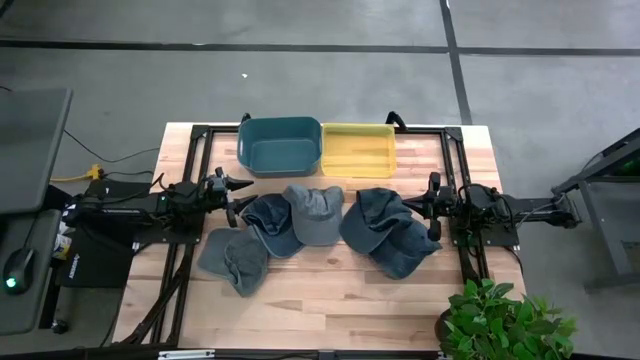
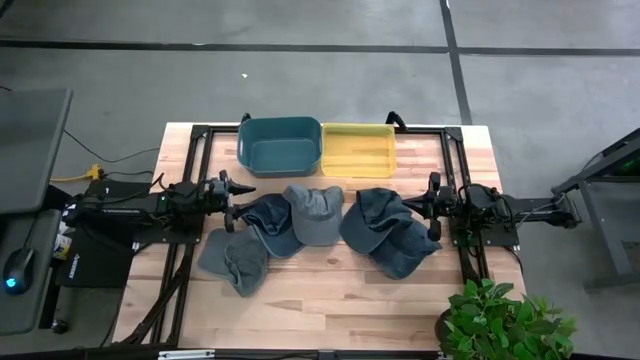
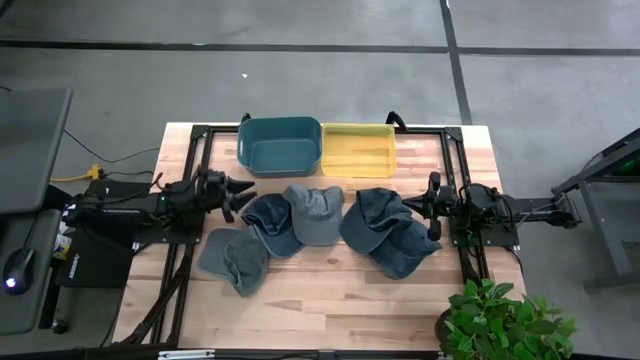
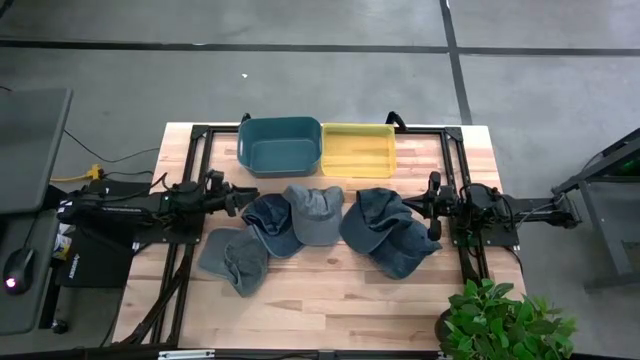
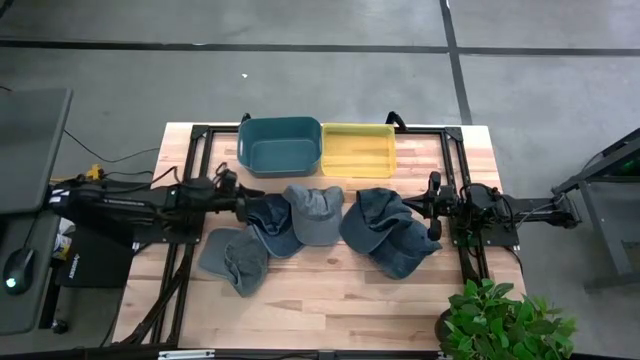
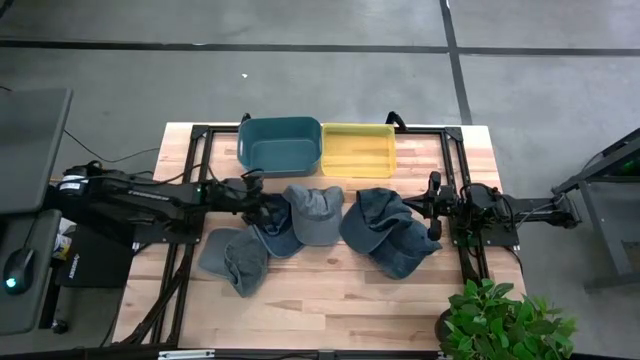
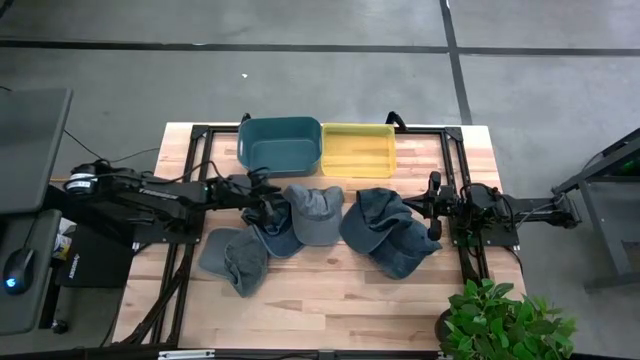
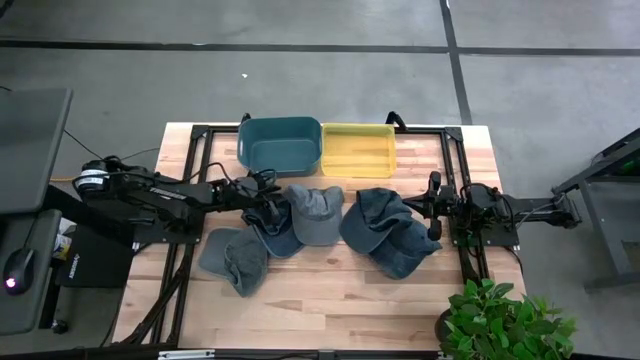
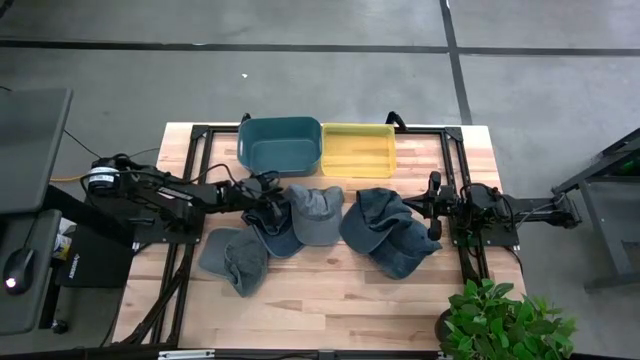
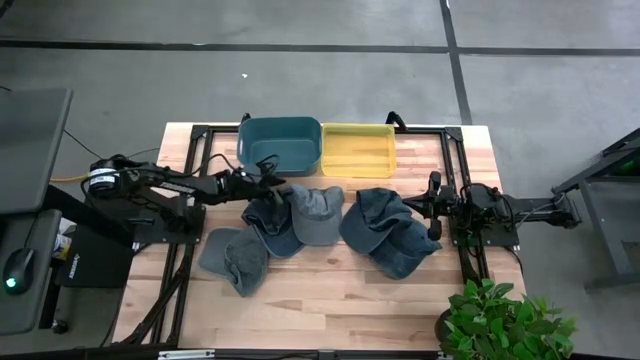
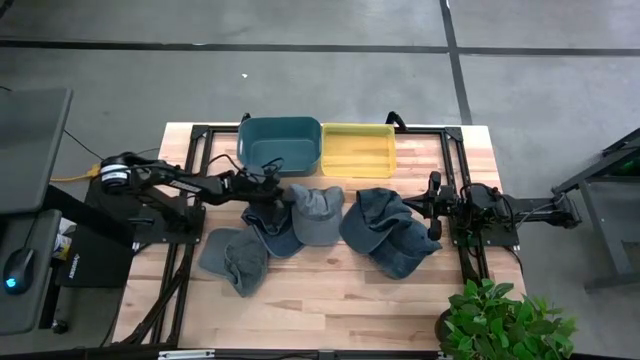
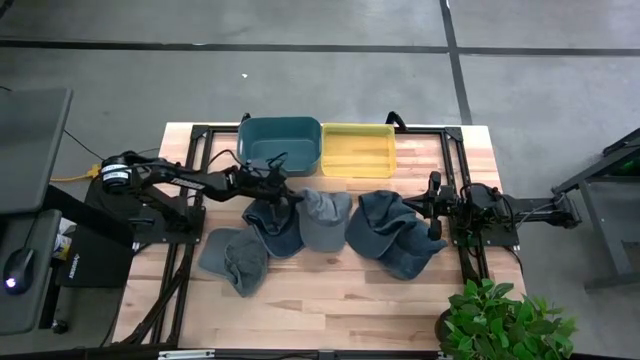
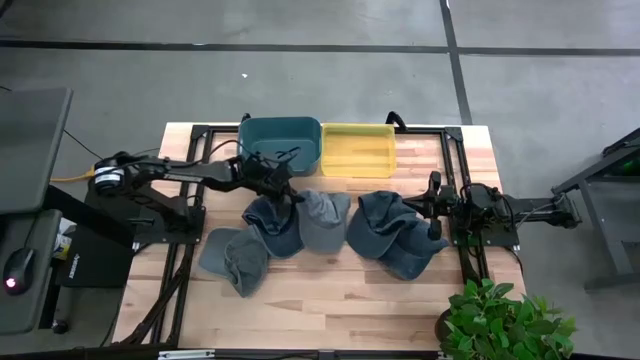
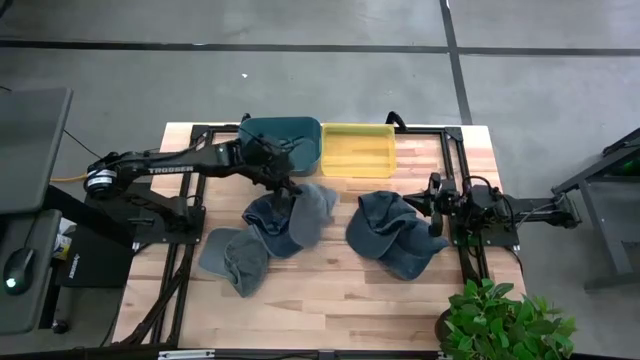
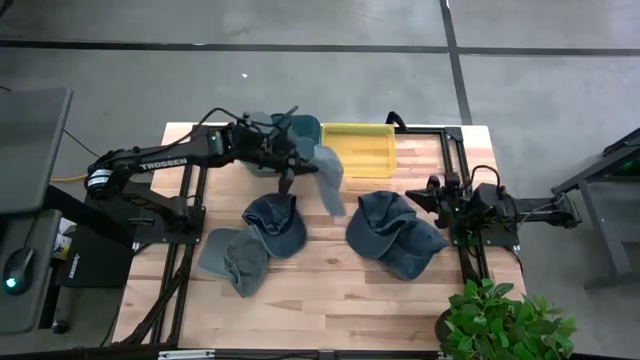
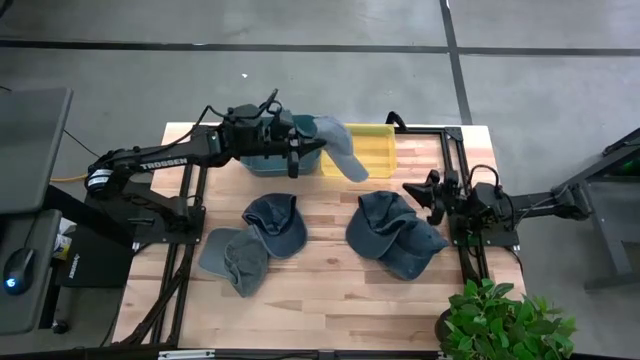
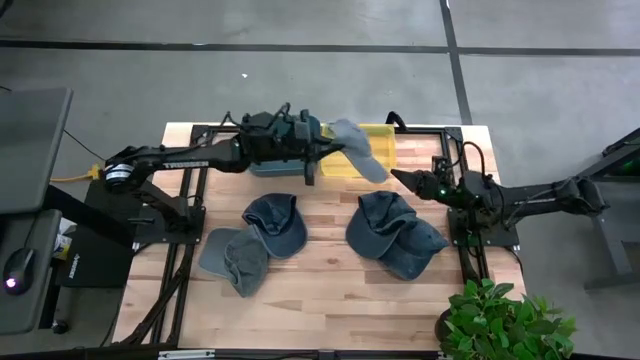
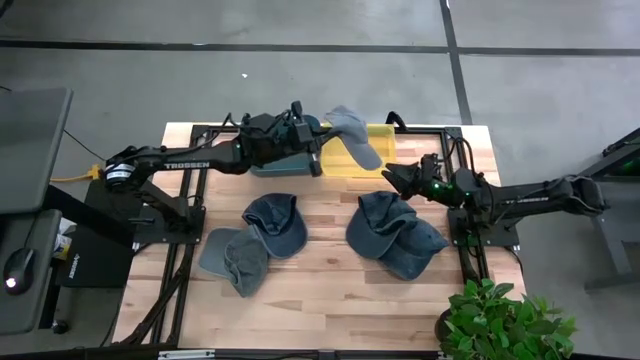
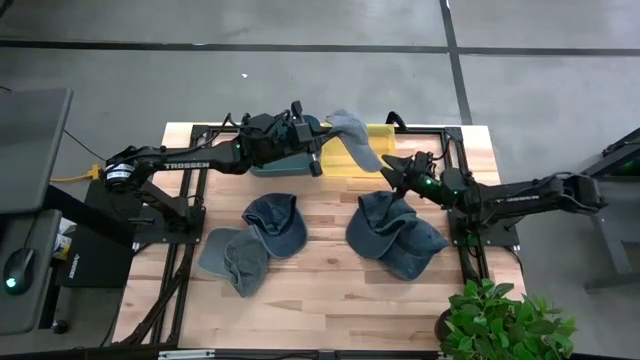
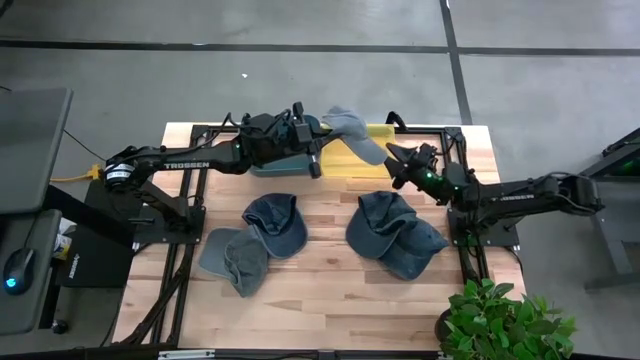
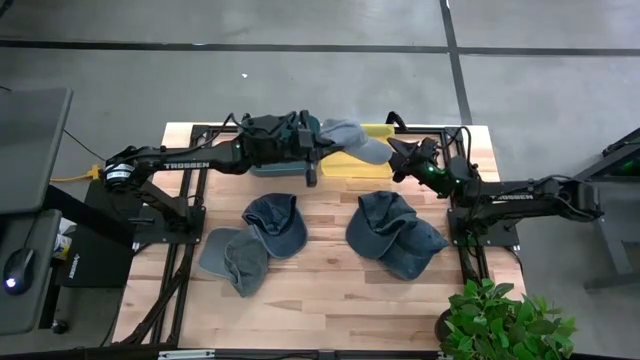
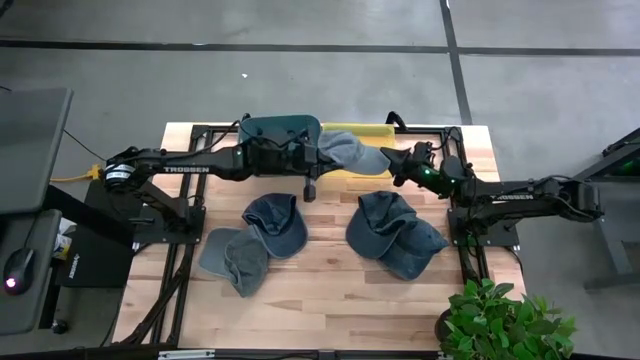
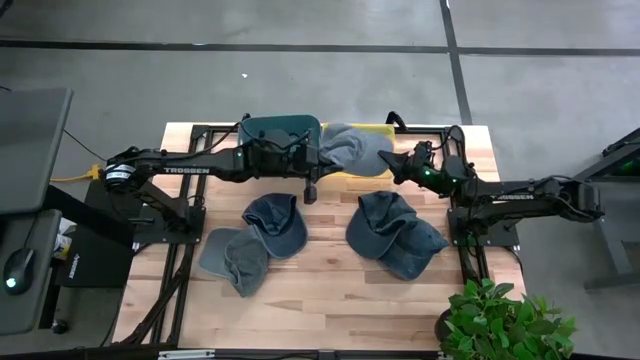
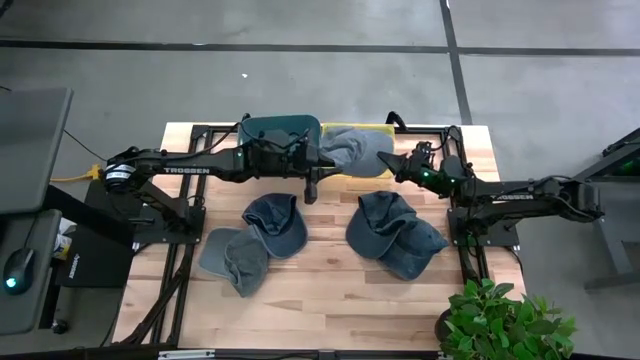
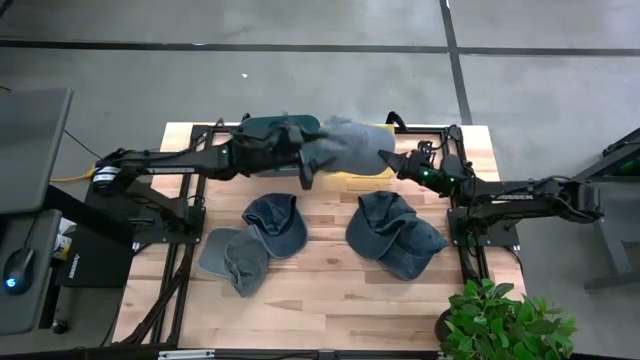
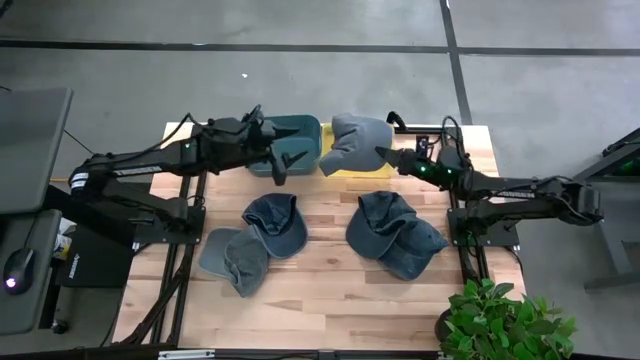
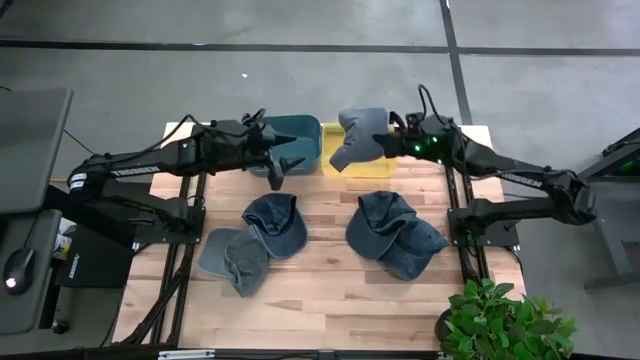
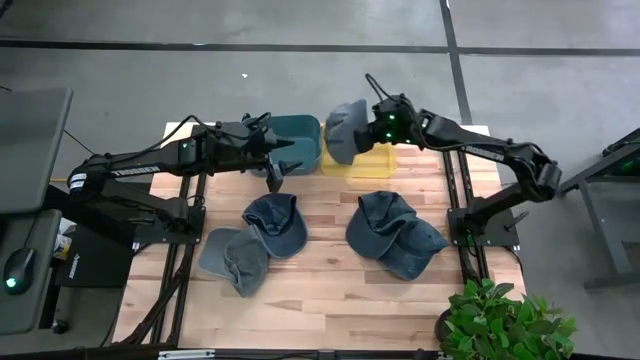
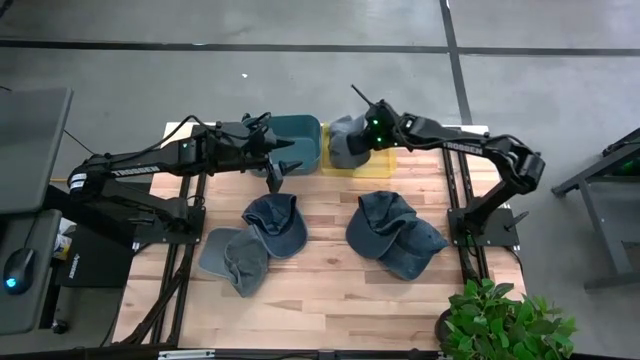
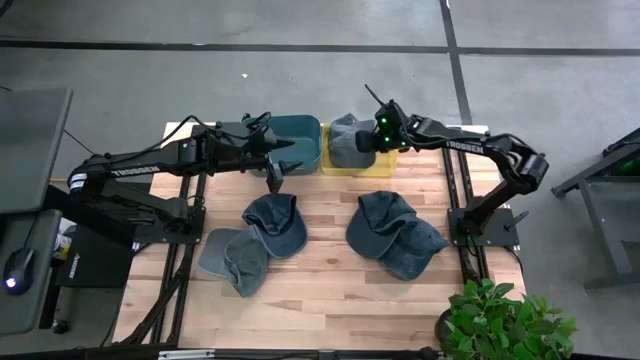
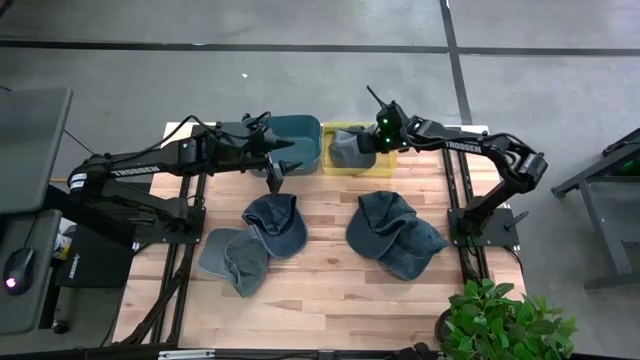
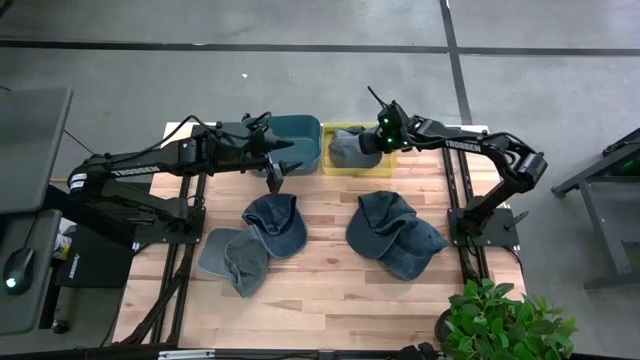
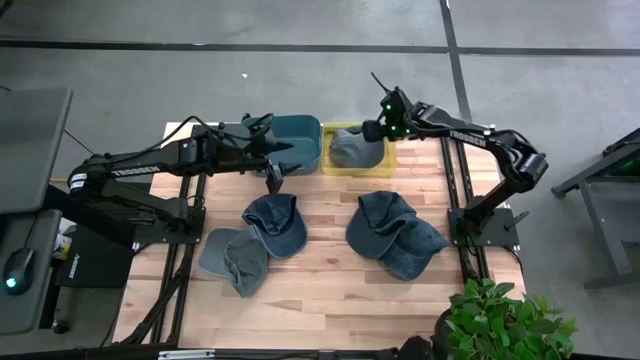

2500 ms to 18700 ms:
Task: Pick & Place hat
Put the top gray cap into the yellow bin

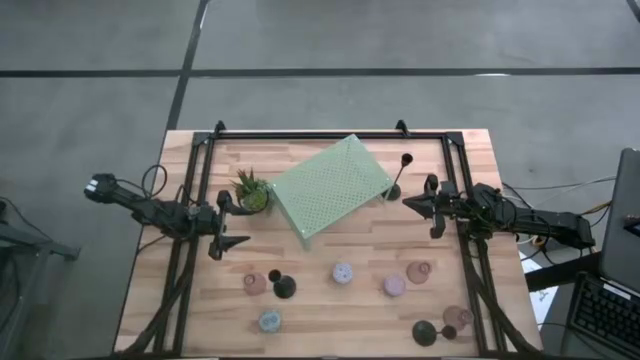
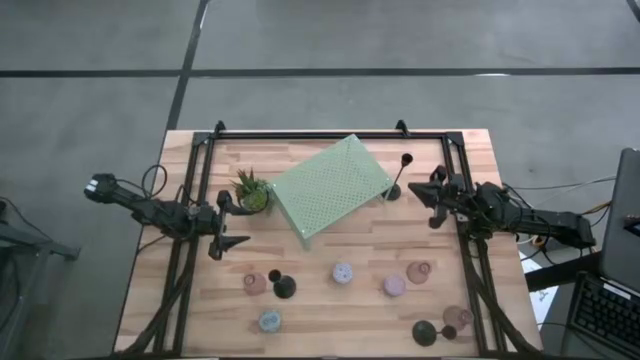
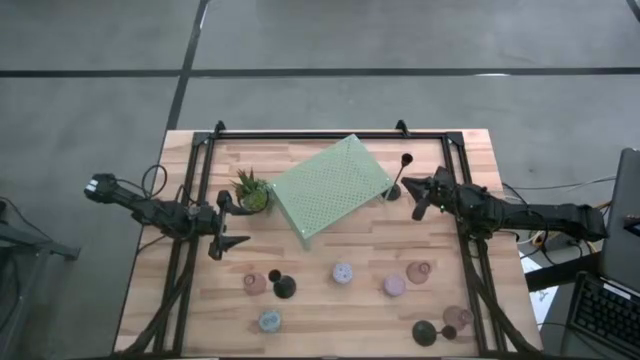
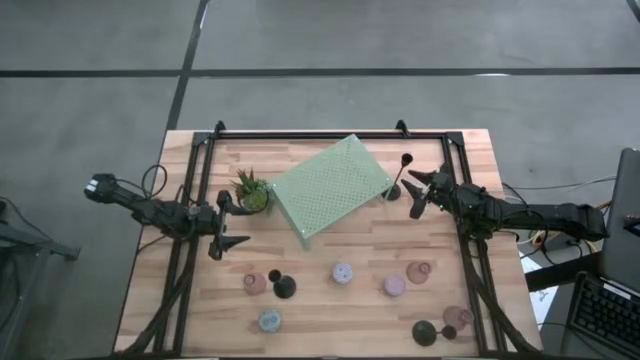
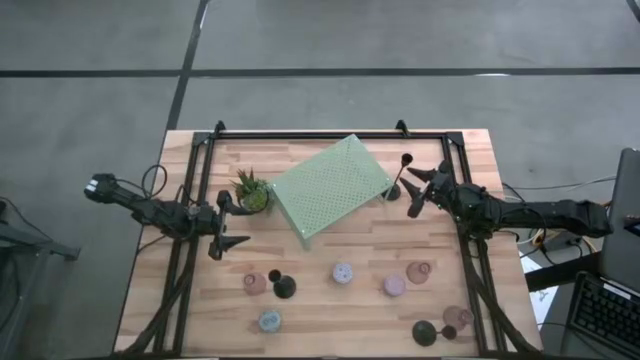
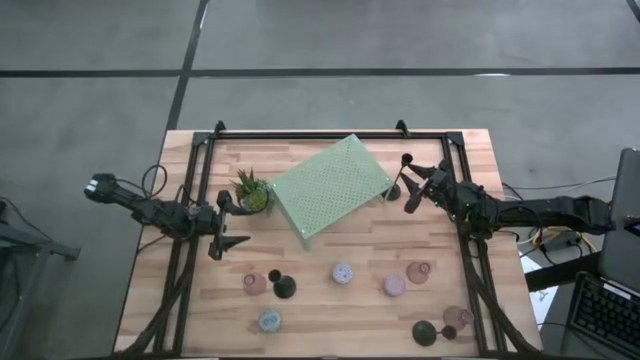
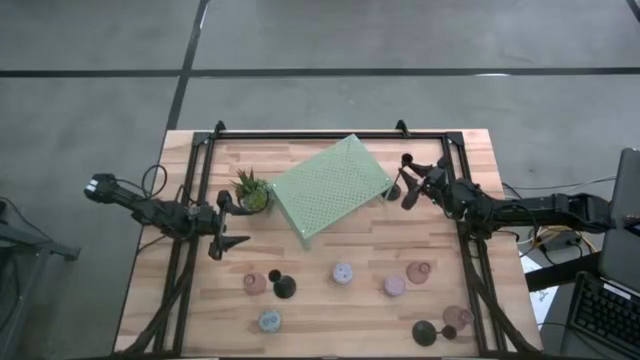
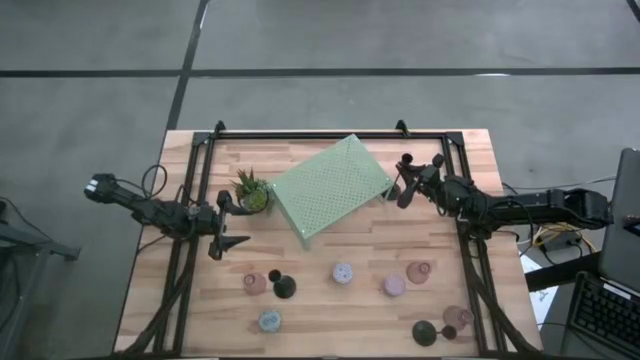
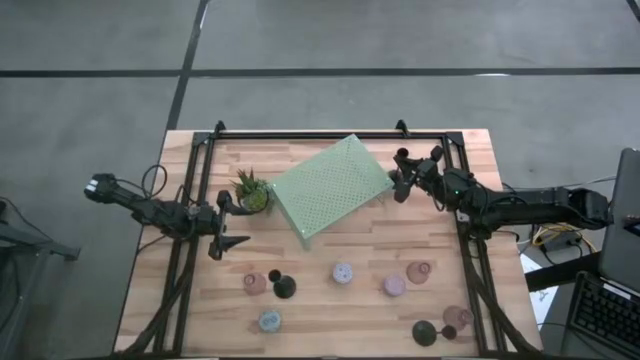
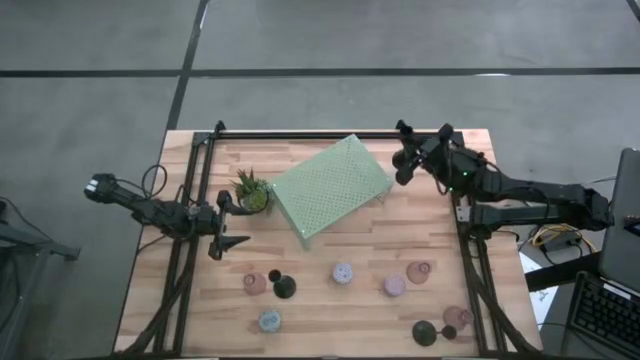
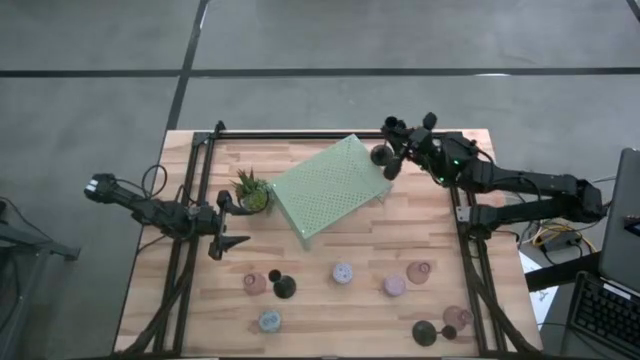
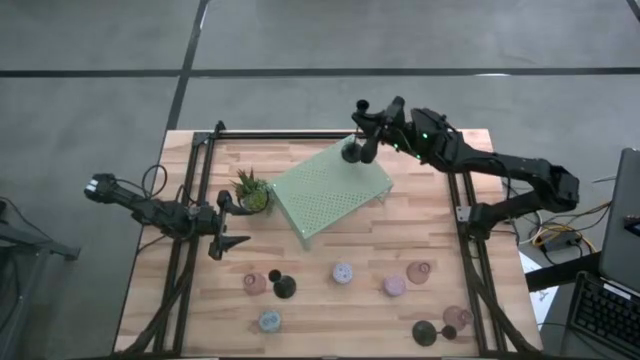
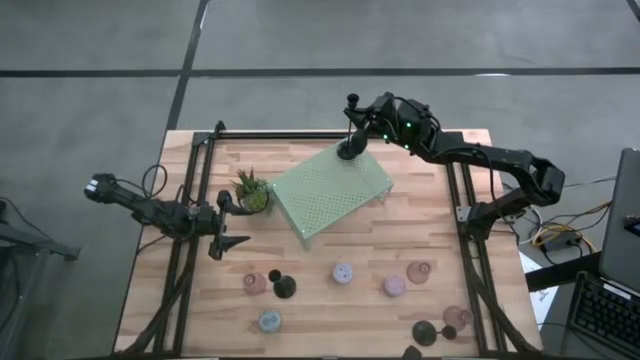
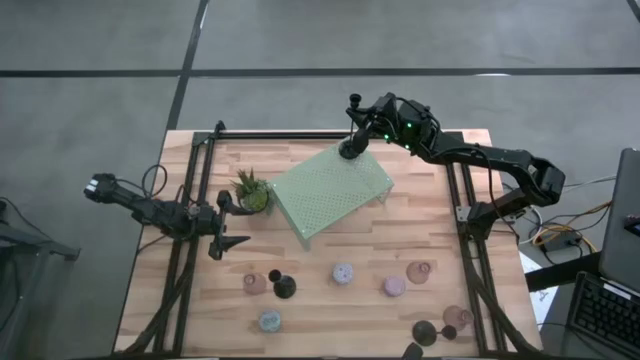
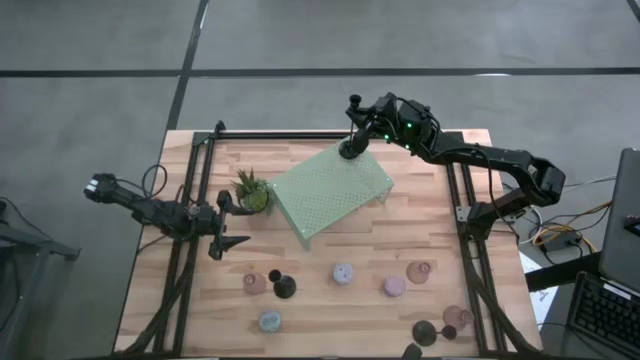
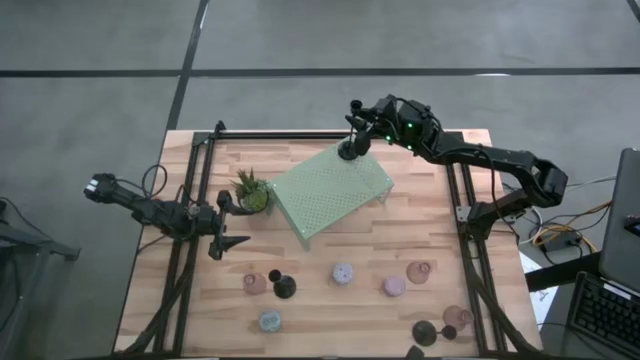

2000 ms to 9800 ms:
Task: Pick & Place candle stick holders
Put the top right black candle holder on the shelf
